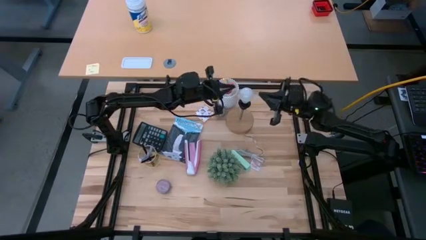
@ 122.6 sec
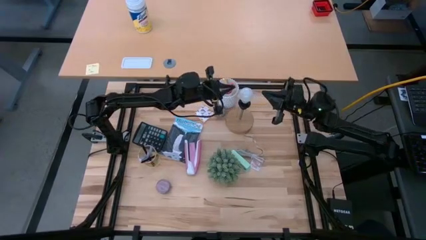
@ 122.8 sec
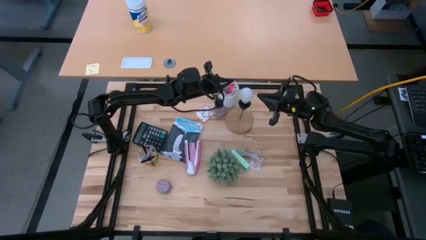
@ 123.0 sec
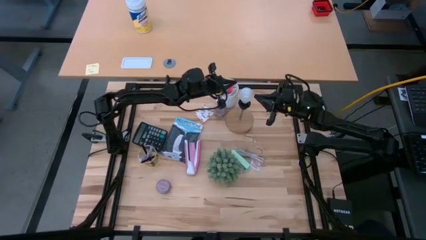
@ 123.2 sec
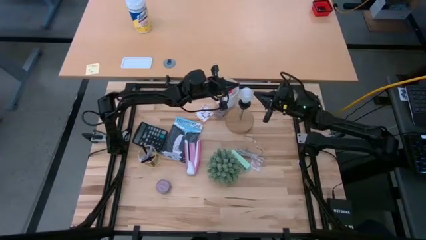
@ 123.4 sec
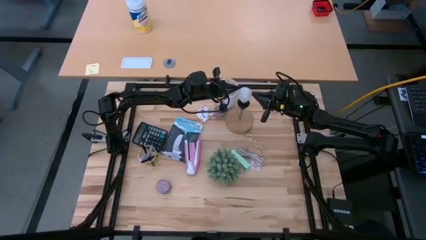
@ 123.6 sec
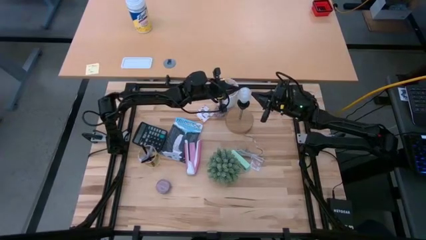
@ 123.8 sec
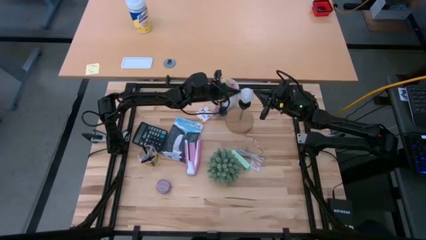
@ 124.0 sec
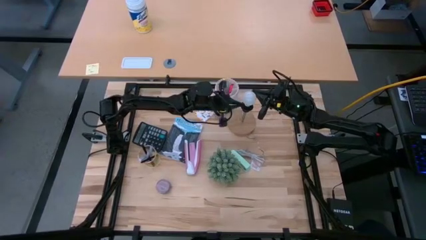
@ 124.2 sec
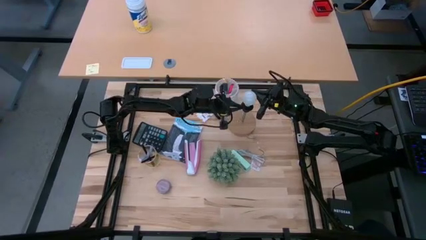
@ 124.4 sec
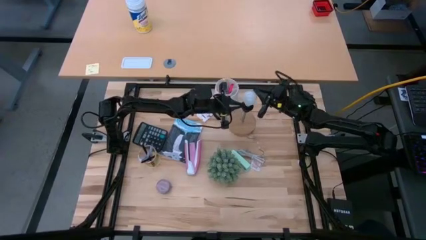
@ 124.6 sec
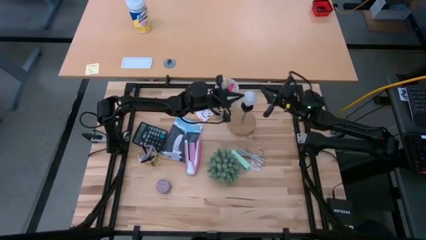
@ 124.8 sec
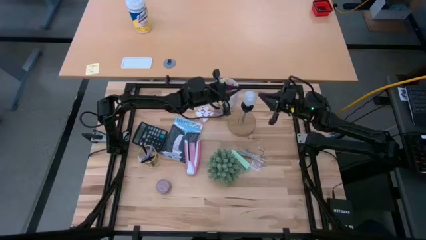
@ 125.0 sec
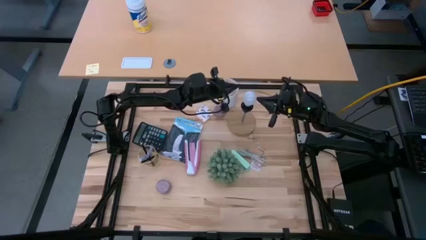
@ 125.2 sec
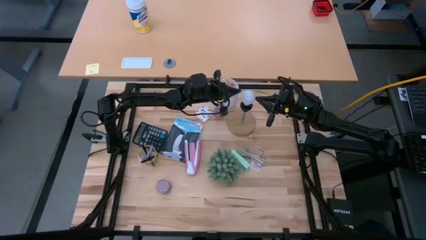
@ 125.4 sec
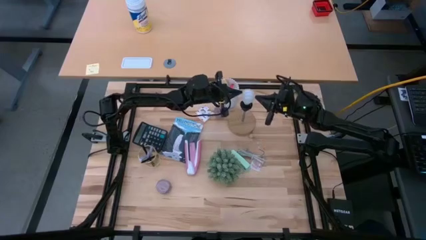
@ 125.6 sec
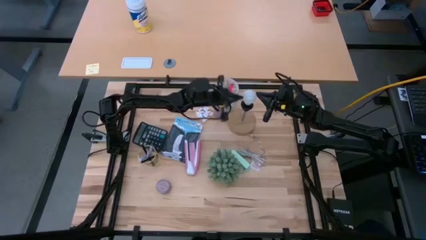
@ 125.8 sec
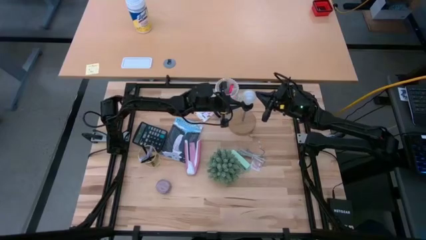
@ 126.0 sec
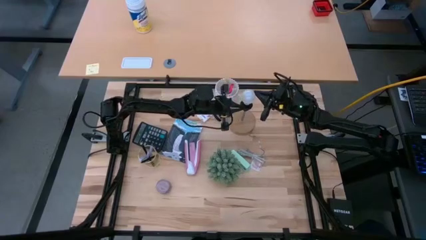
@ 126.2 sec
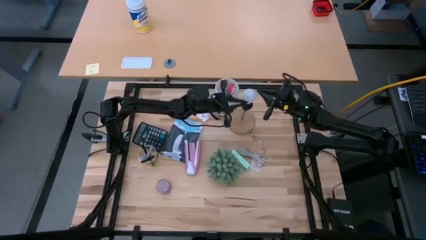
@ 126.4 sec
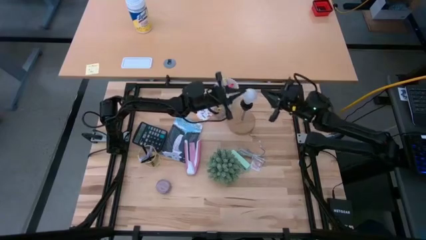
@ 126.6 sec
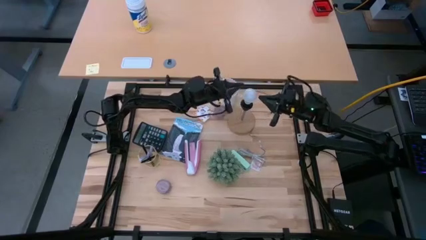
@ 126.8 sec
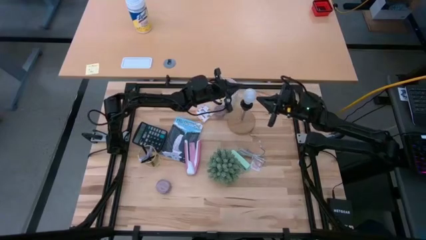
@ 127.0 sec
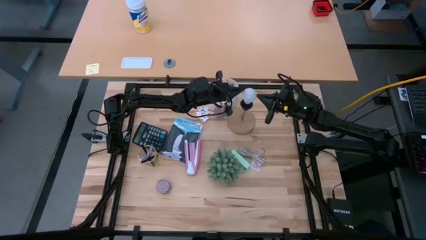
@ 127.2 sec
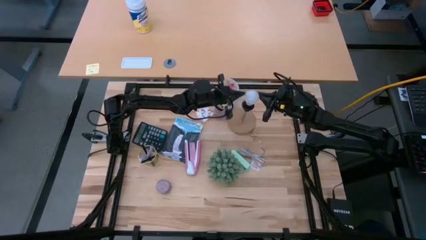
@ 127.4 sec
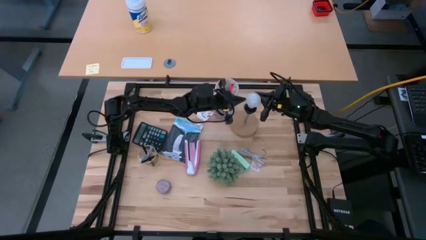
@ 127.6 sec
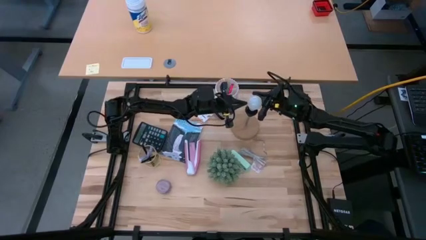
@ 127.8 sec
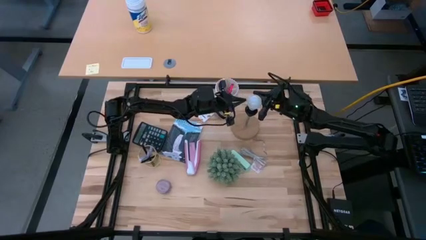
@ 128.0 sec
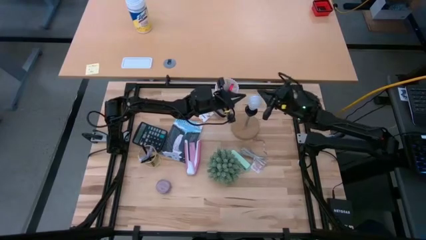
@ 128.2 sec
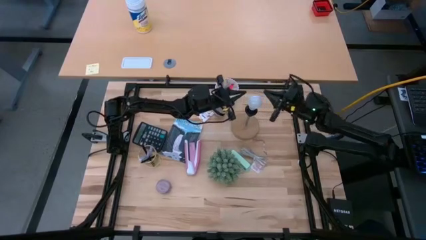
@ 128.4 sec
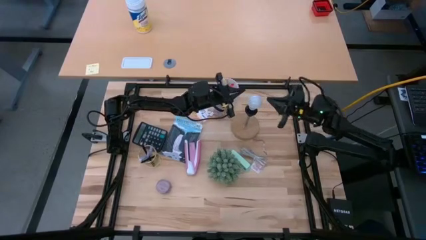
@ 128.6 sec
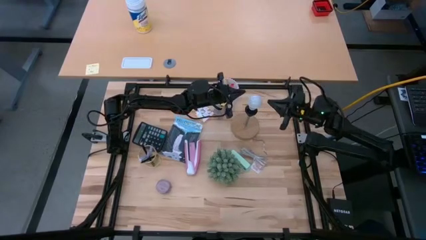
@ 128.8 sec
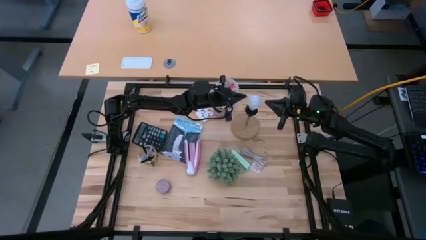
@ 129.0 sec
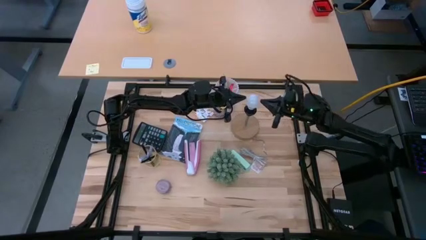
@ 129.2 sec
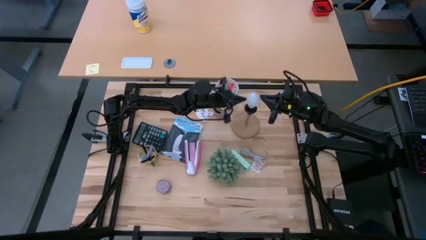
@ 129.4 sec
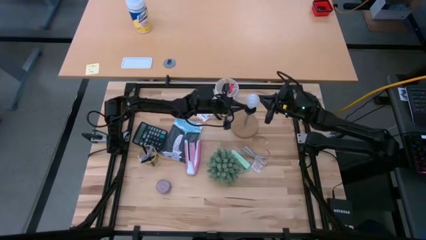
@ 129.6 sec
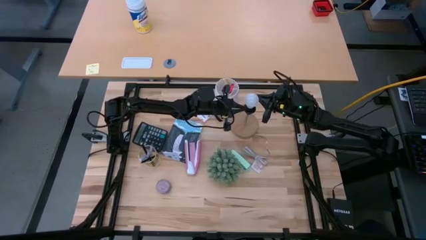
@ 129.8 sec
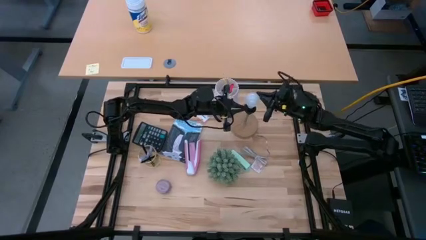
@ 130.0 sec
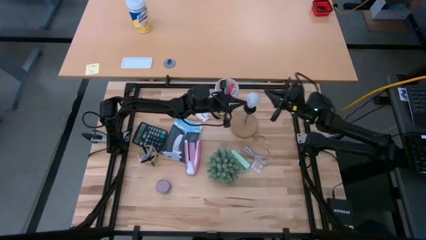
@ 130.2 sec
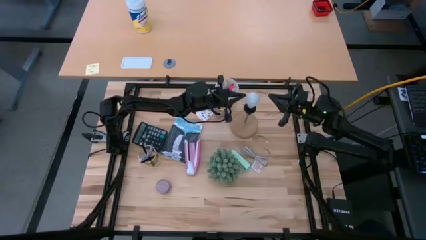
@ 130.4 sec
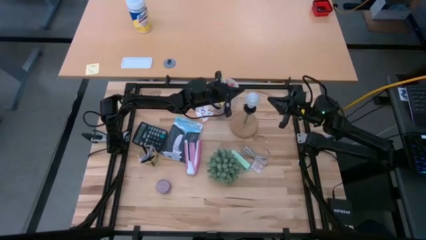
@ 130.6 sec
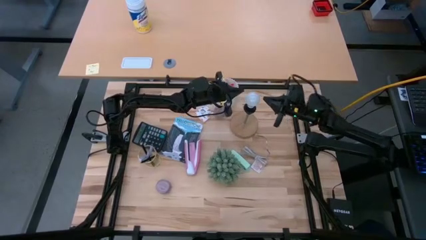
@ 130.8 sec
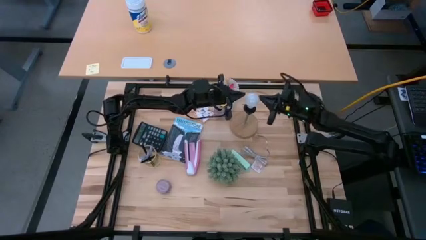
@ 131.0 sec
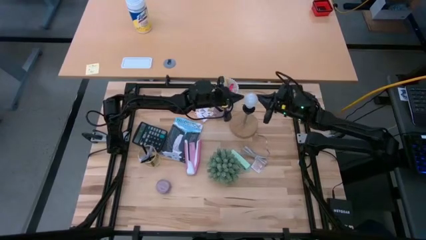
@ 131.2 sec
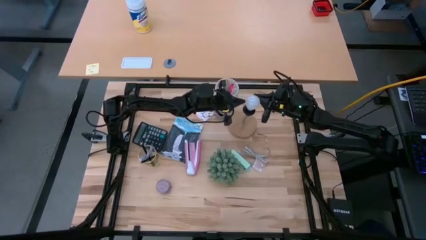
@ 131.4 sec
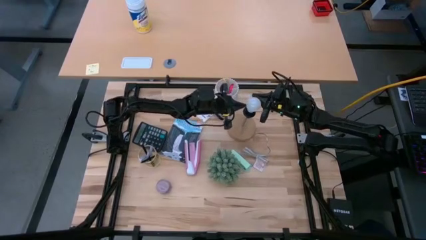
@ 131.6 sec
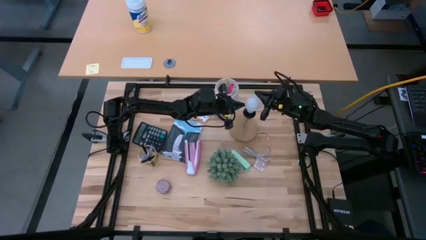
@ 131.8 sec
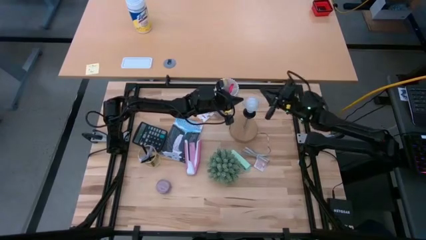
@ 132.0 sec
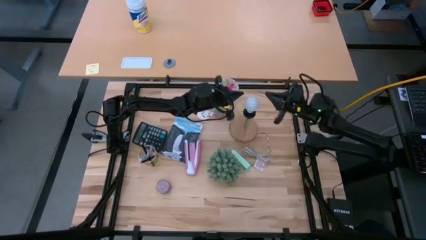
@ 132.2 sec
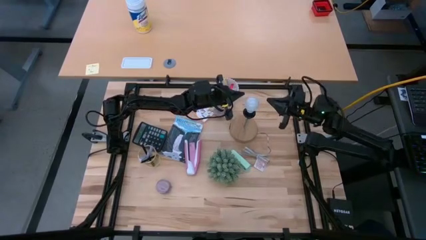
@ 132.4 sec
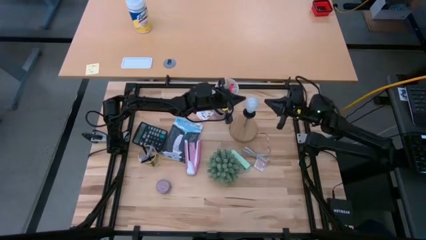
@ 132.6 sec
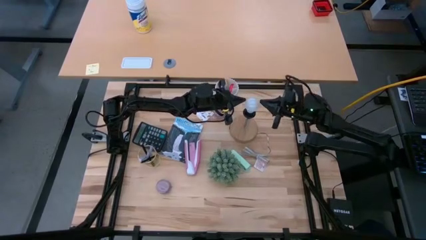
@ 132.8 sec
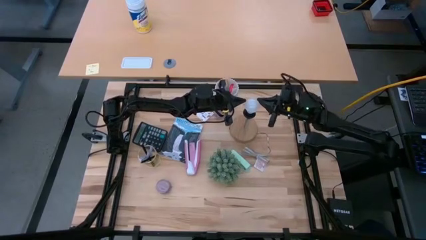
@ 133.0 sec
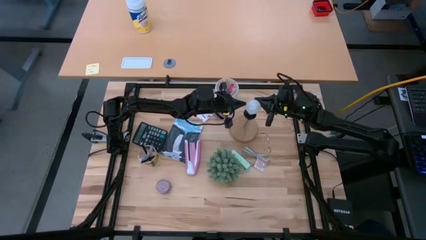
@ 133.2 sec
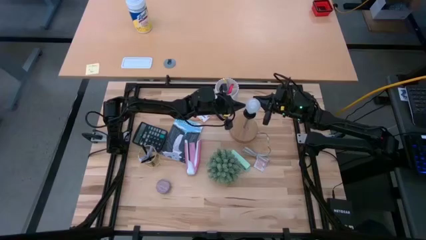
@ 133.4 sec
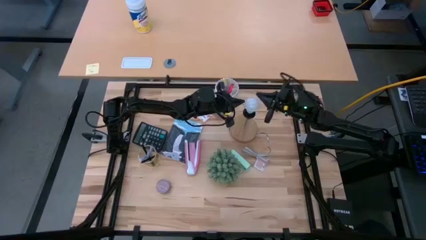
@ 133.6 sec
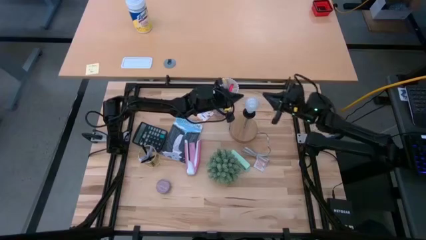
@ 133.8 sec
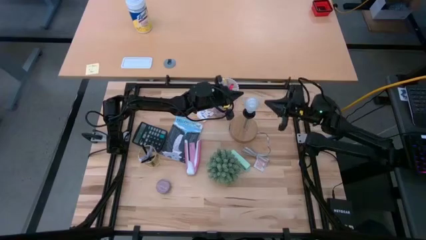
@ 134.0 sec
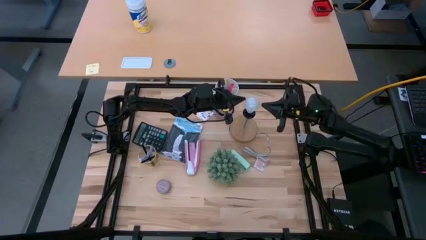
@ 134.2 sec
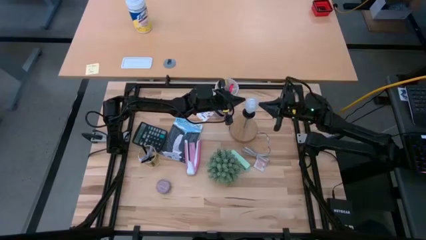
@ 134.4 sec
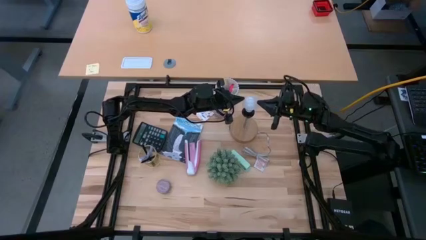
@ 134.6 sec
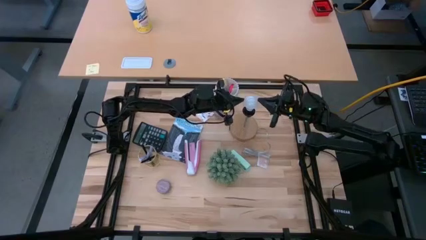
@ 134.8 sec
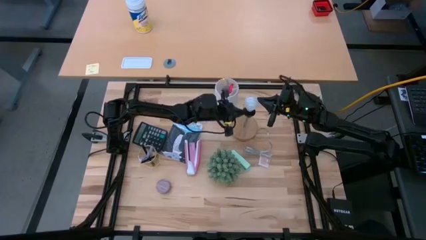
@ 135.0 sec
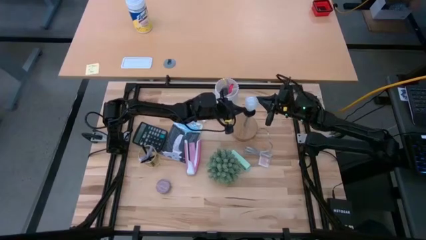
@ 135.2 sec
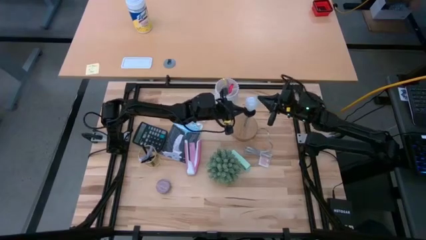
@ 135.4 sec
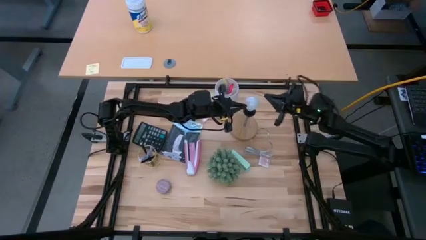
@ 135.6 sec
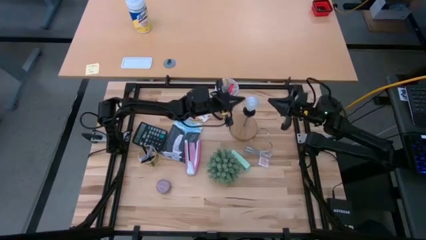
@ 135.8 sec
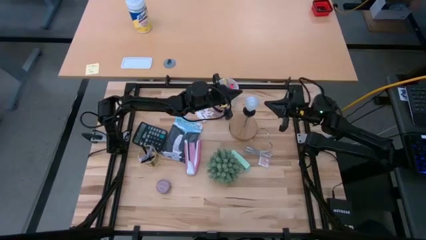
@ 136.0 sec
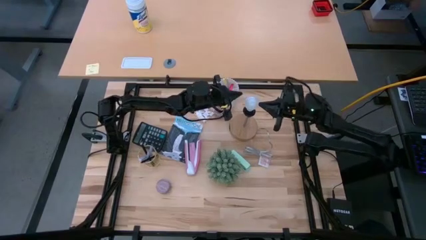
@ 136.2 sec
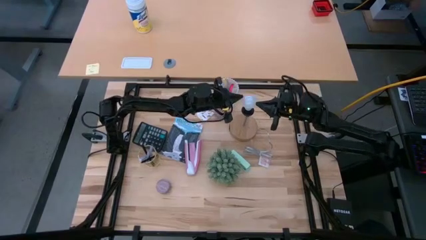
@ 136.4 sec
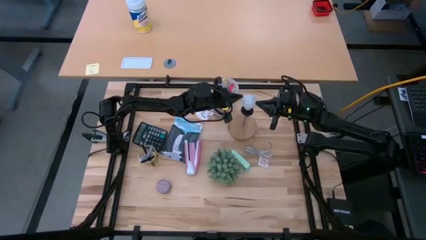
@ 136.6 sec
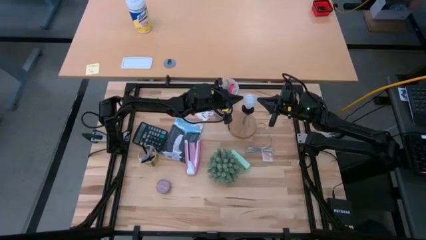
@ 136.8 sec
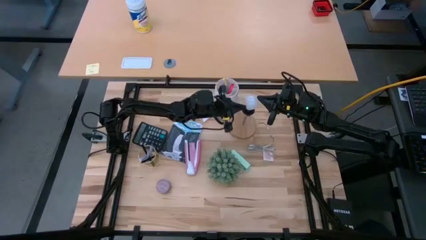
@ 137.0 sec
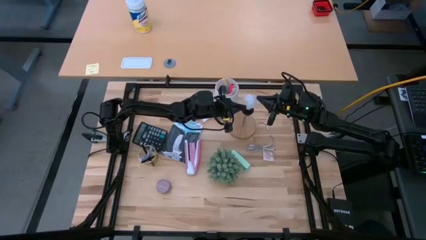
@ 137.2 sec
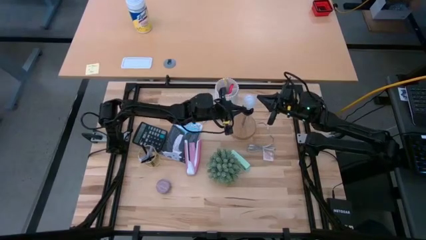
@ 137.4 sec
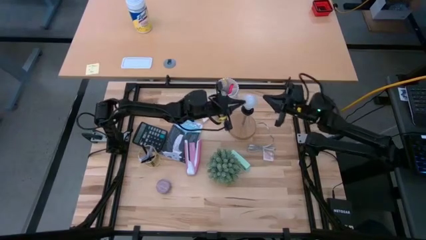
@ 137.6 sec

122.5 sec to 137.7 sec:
Task: Screw lightbulb
Remove the lightbulb from the lamp
